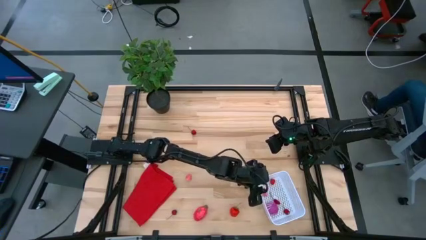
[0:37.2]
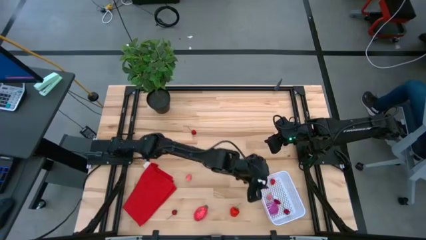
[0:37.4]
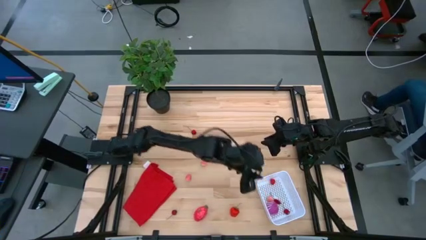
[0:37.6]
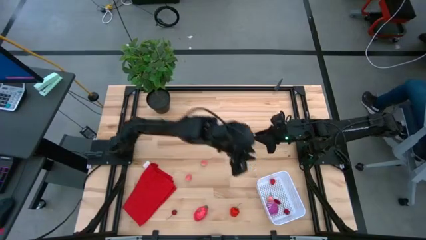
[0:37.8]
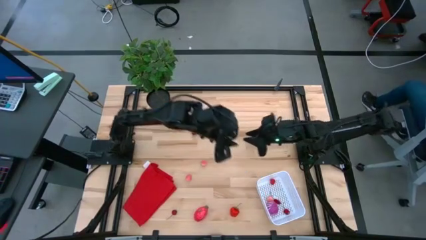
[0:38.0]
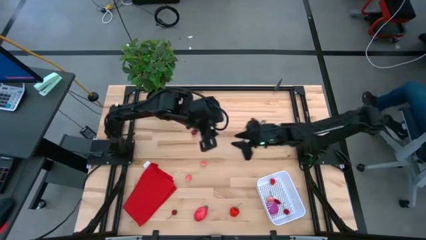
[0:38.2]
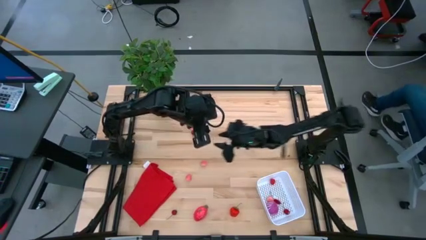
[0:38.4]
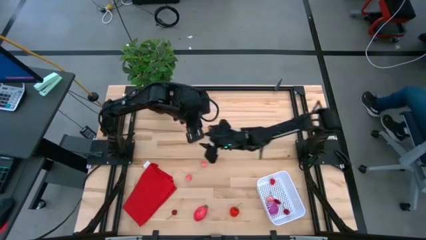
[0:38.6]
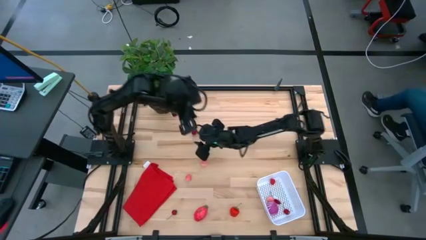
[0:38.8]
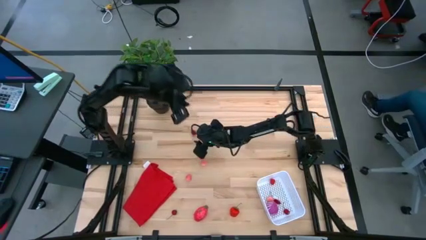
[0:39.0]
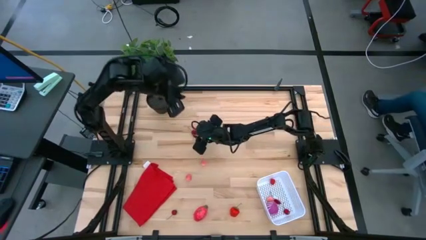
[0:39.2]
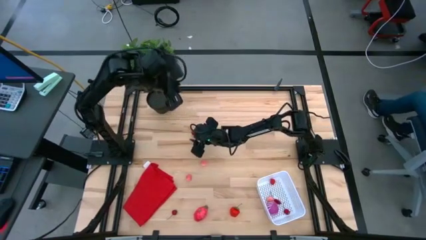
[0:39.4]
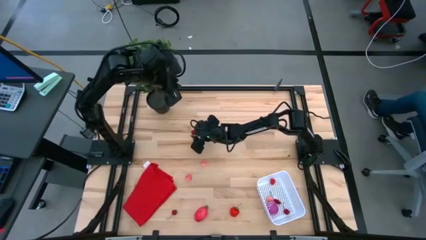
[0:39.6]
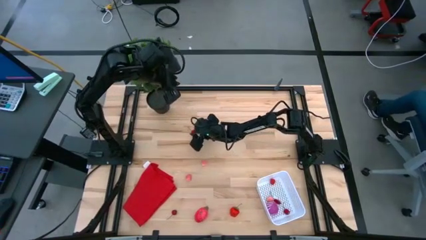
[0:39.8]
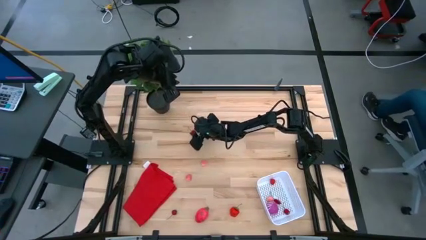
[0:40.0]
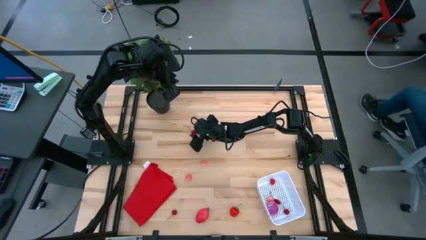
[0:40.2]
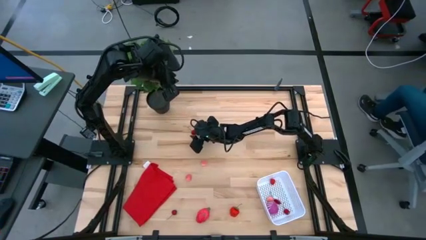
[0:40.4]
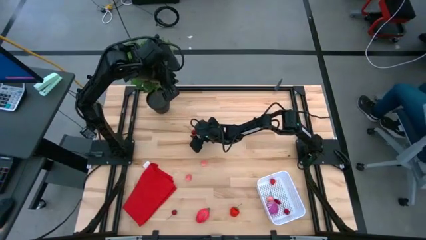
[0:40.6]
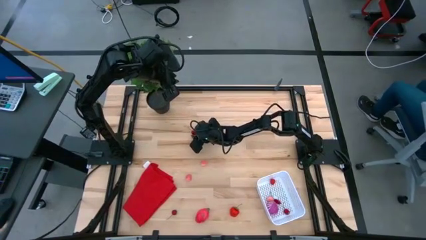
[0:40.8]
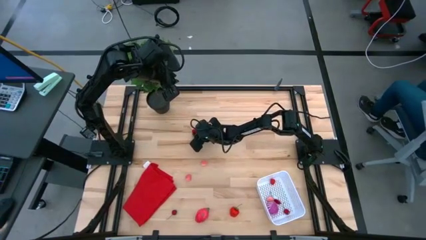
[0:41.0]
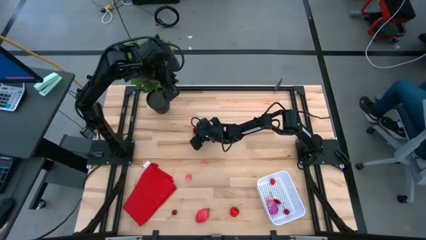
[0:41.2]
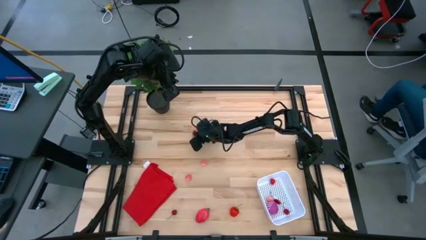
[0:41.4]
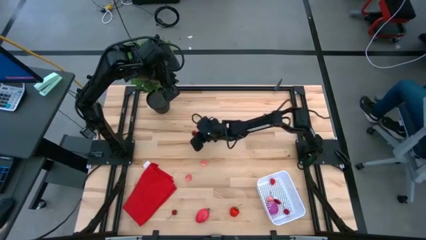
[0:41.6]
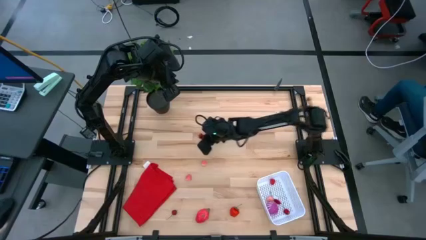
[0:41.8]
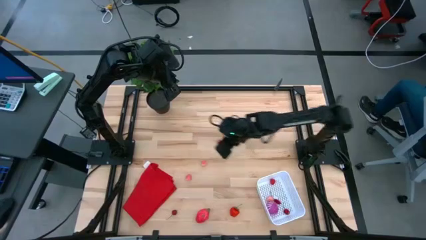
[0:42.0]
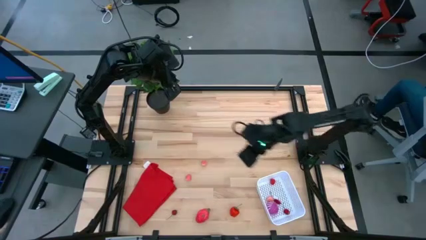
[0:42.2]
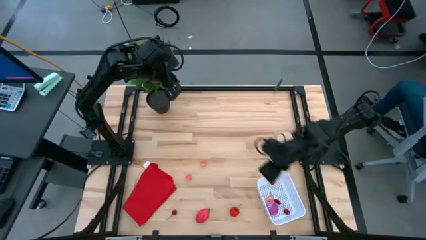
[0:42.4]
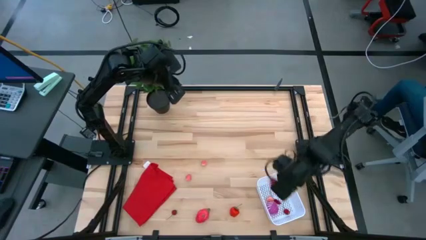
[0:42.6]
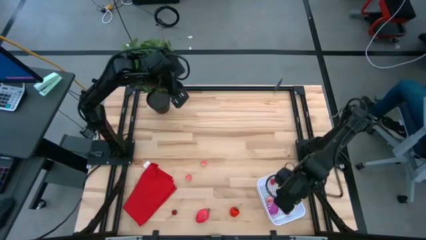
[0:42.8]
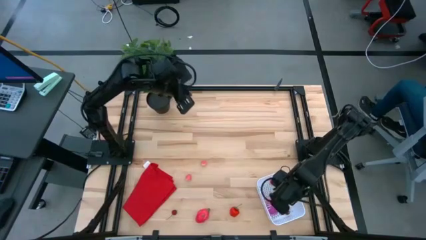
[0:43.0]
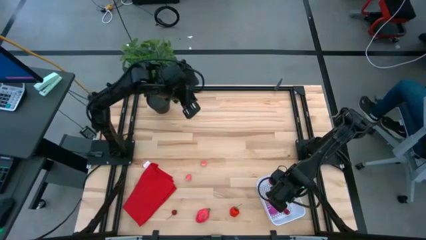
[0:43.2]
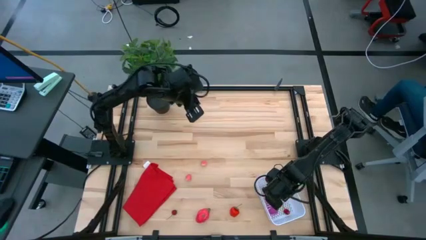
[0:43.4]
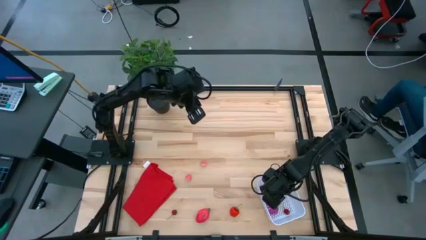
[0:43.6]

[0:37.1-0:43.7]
Task: Pick and placing Produce into tupperware
Put the red cherry into the white basket

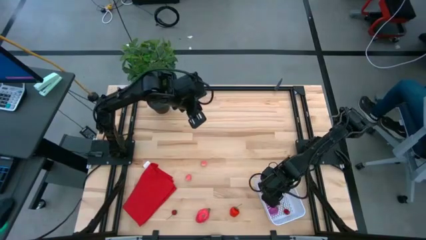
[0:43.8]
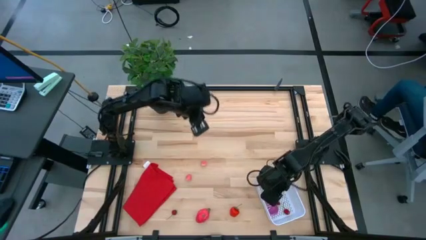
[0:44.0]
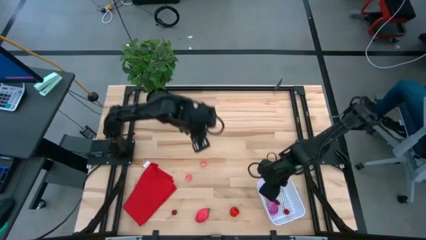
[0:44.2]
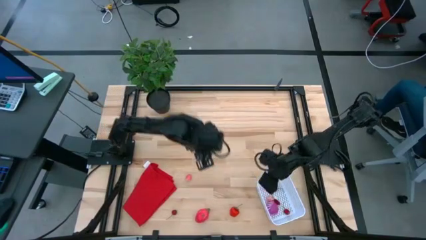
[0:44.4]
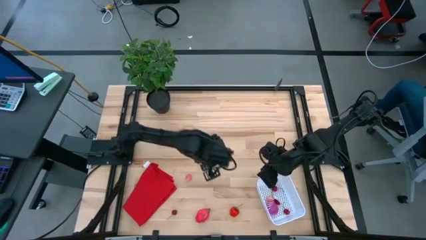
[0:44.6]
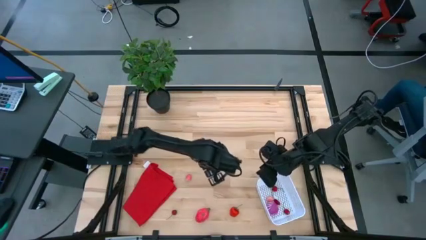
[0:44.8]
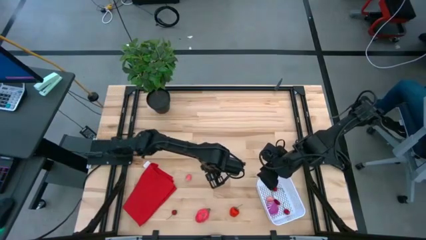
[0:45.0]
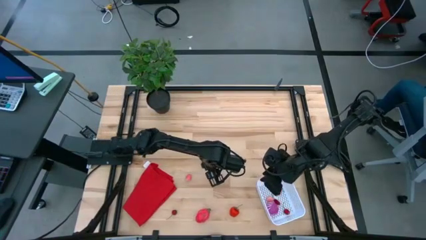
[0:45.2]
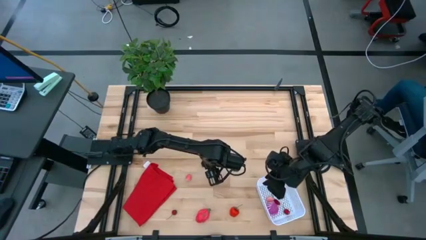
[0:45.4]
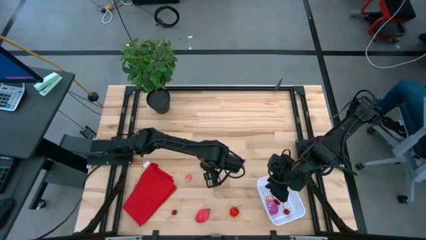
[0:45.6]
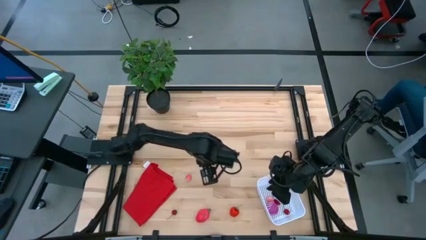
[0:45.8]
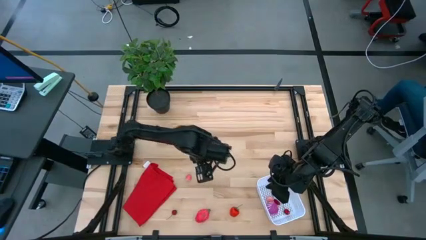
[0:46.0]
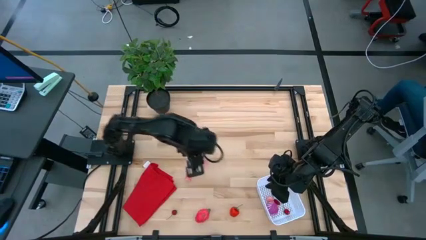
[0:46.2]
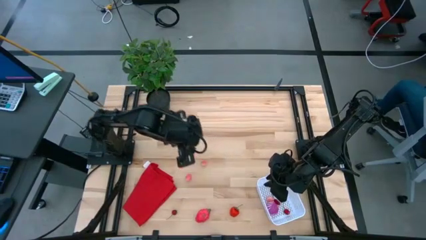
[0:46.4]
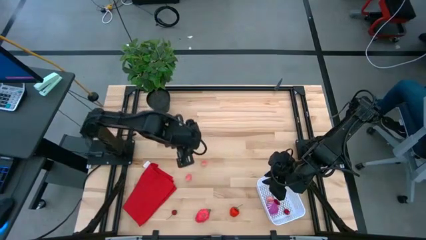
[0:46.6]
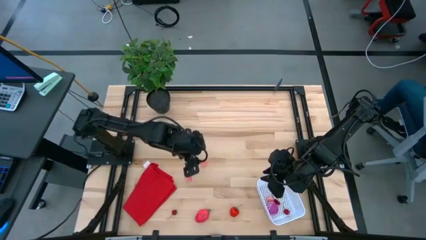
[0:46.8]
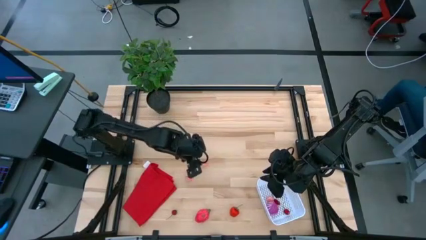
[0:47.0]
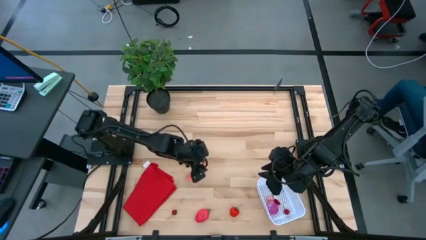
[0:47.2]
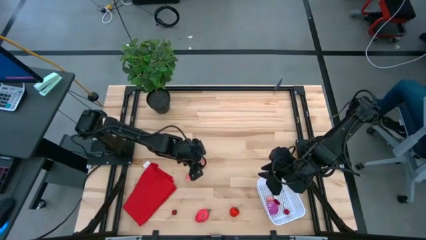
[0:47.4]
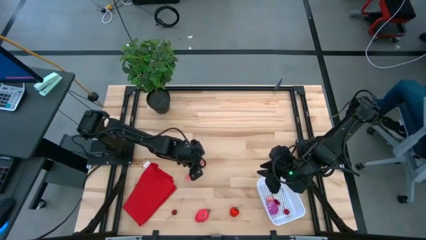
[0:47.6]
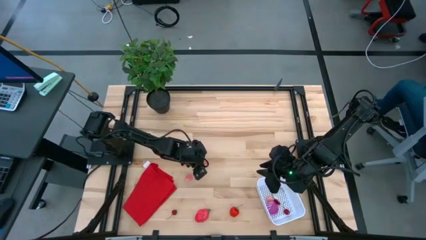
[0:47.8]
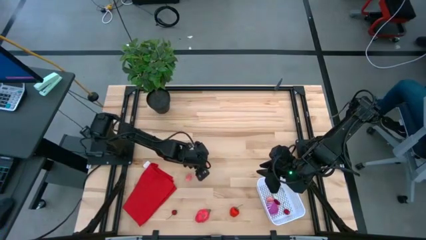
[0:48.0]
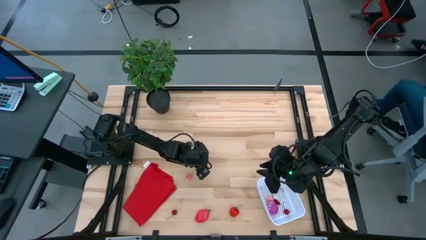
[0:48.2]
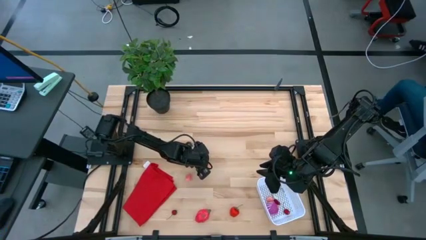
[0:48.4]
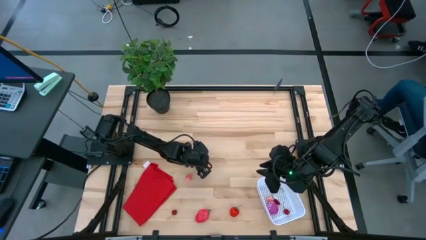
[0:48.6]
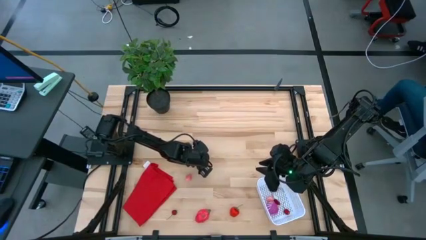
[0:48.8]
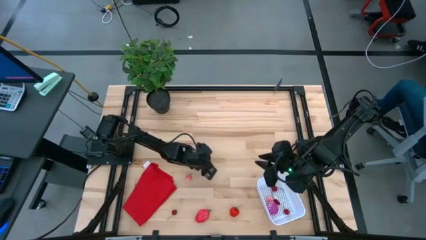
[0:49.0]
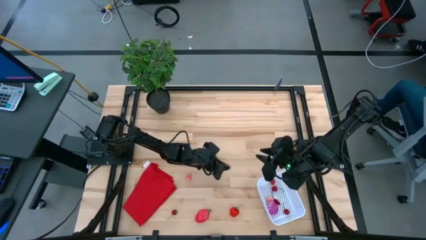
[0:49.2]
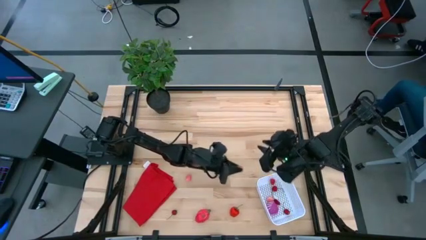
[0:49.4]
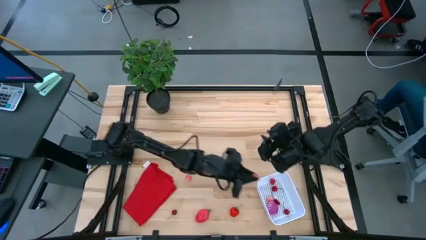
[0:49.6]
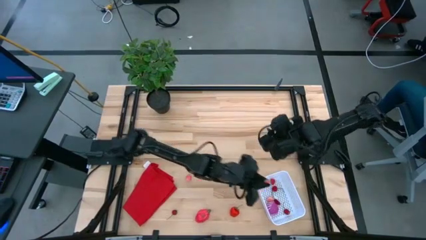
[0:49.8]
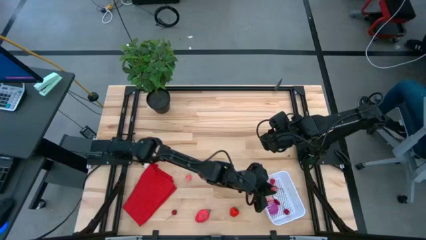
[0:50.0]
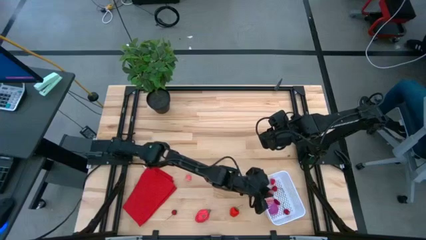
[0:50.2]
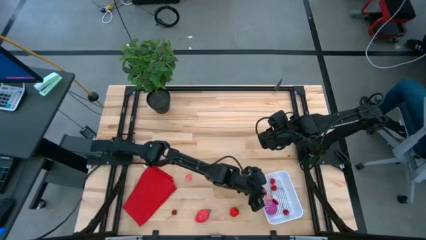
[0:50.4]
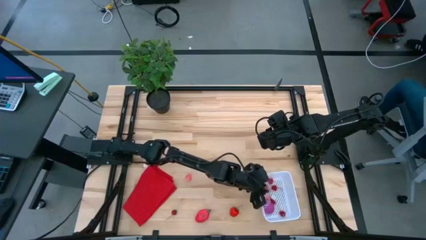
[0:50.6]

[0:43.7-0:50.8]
Put the peach into the white basket

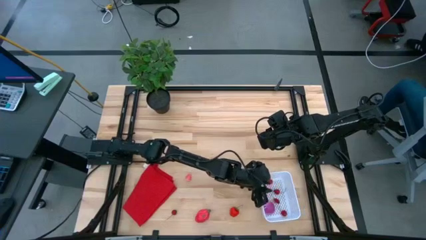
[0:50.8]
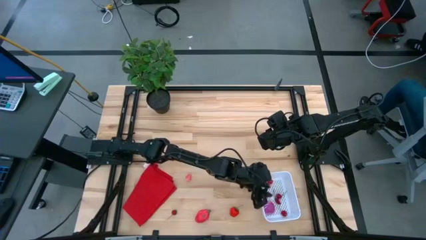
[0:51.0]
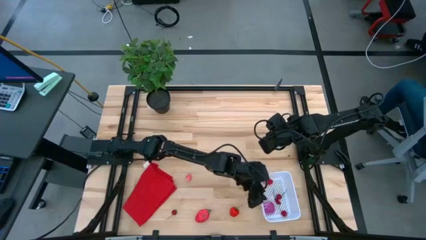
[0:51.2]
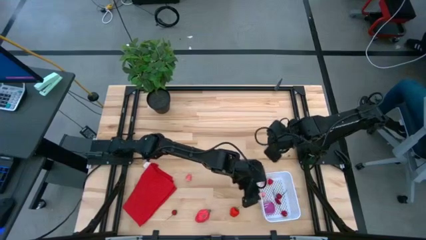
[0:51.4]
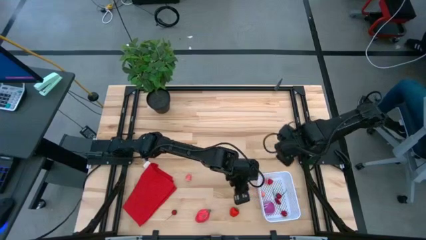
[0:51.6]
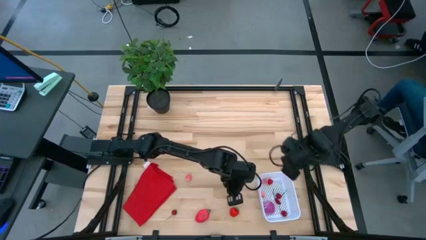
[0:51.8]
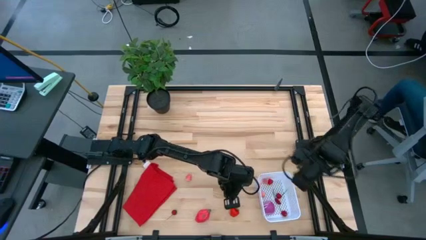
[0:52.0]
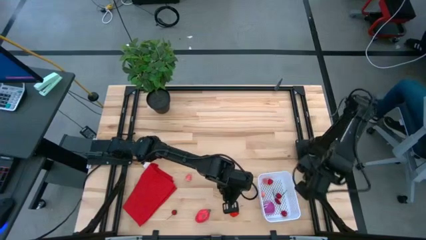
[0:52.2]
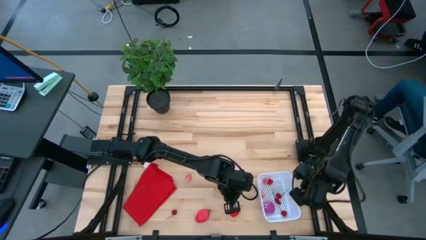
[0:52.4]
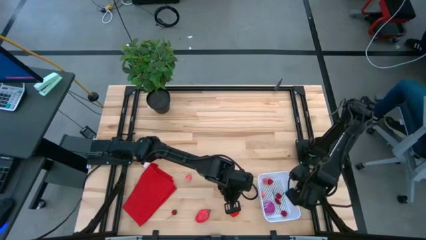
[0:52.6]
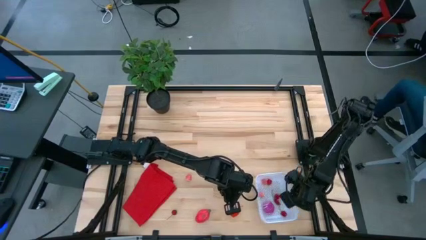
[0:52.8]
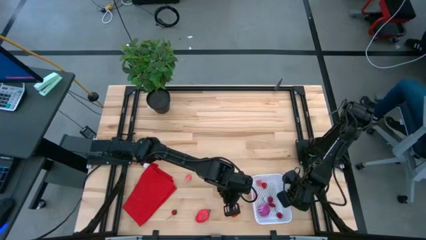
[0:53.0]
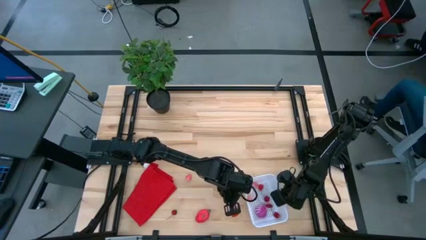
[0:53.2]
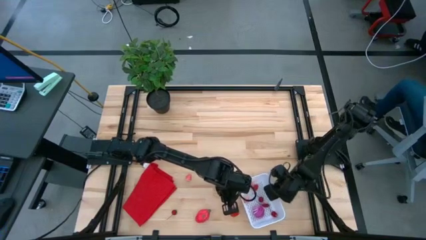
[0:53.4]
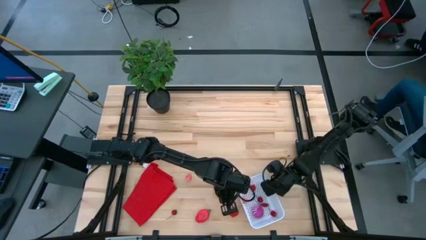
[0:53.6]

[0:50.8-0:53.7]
Adjust the white basket

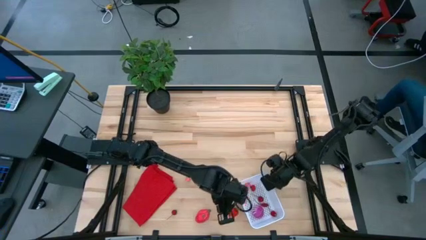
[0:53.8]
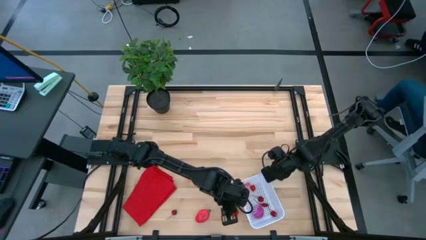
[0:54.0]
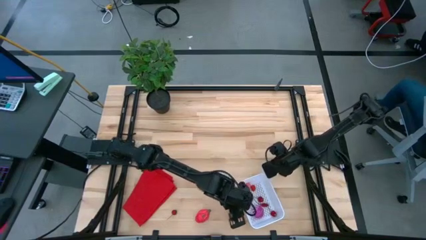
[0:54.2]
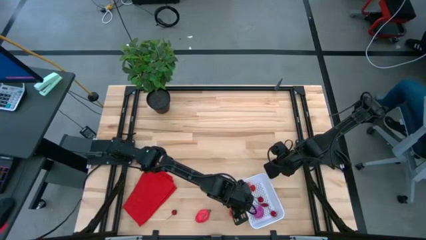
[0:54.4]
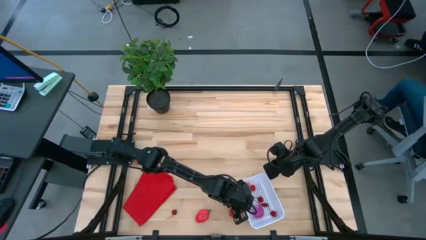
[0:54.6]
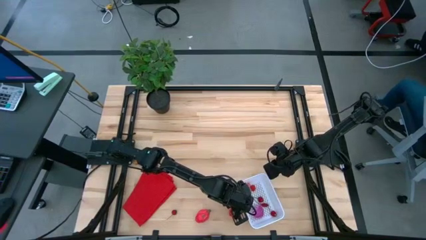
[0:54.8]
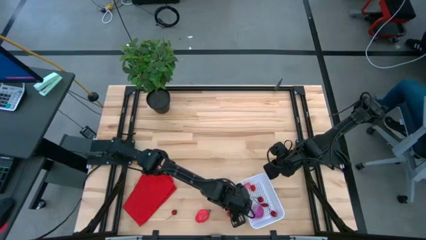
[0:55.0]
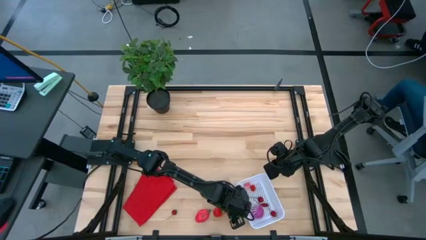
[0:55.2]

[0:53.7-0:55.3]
Put the red strawberry into the white basket
